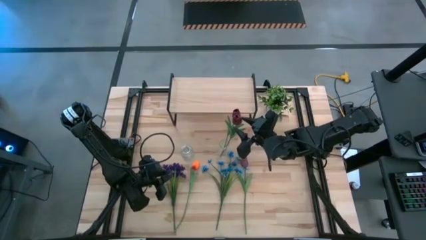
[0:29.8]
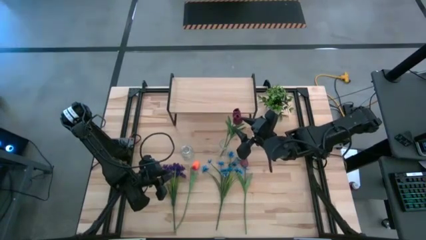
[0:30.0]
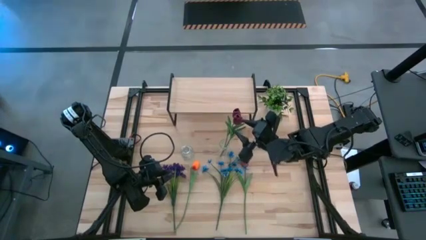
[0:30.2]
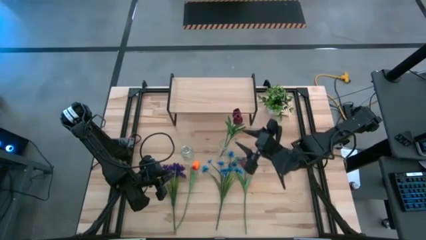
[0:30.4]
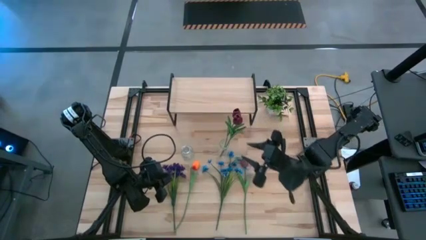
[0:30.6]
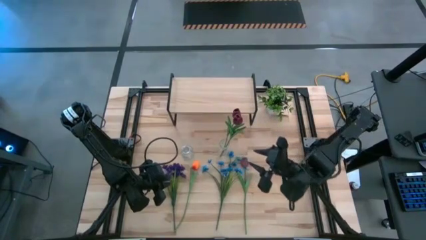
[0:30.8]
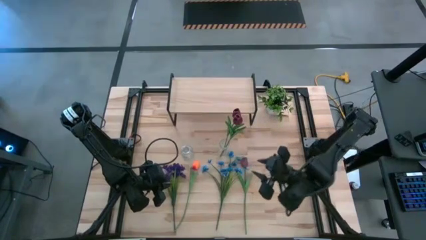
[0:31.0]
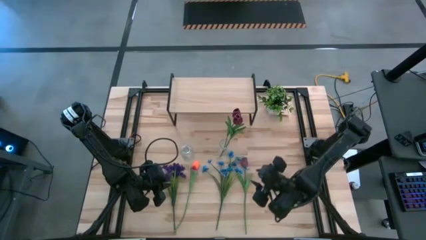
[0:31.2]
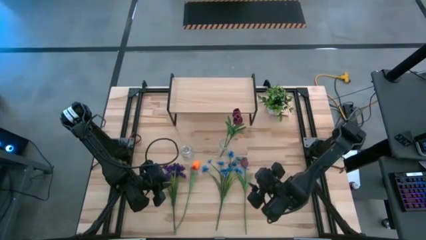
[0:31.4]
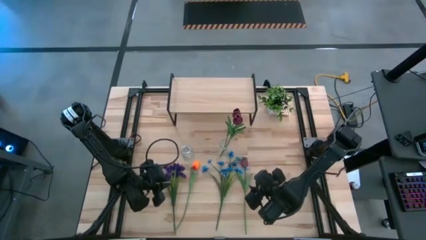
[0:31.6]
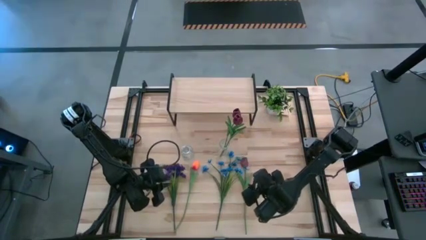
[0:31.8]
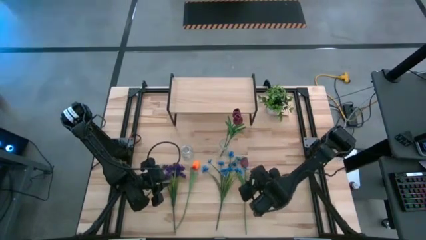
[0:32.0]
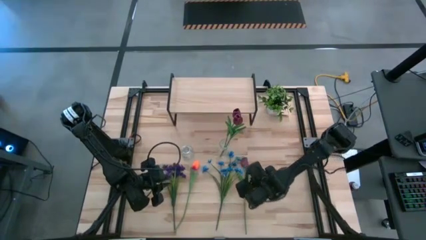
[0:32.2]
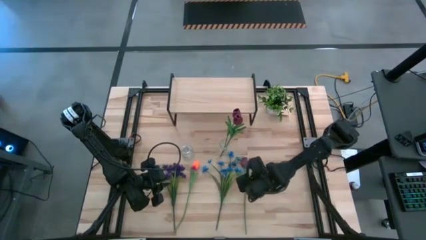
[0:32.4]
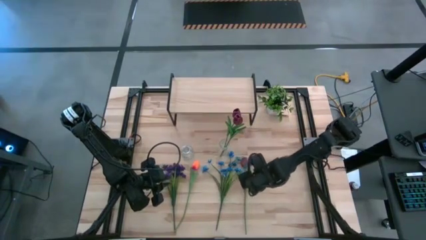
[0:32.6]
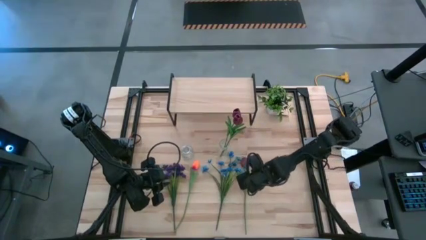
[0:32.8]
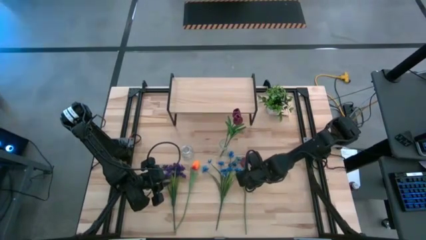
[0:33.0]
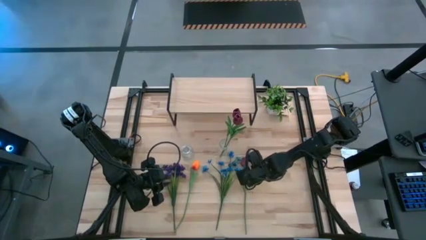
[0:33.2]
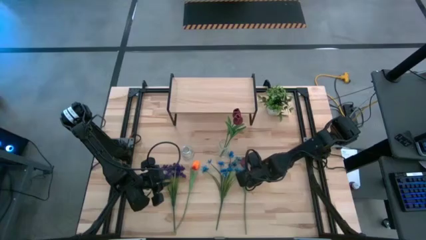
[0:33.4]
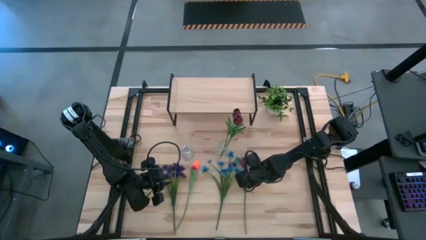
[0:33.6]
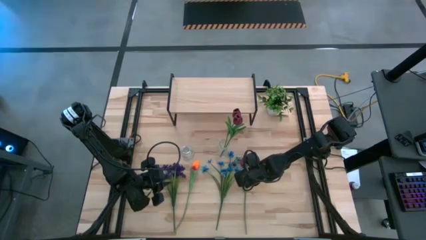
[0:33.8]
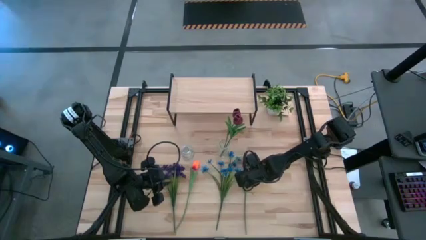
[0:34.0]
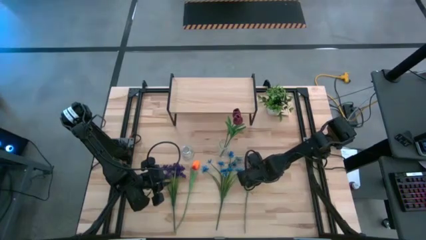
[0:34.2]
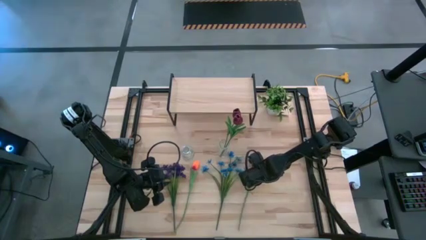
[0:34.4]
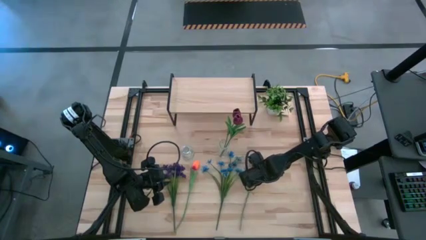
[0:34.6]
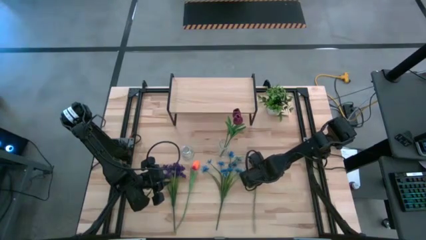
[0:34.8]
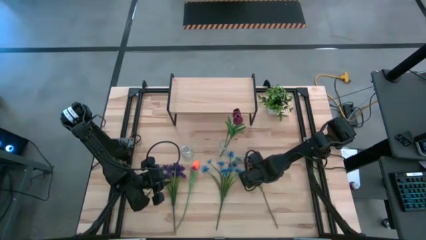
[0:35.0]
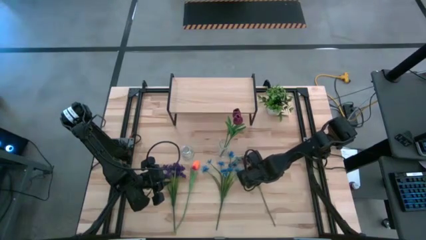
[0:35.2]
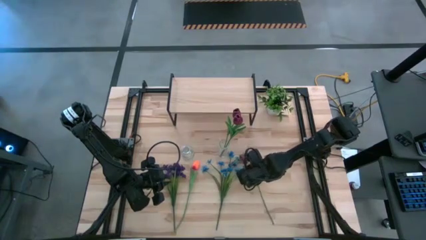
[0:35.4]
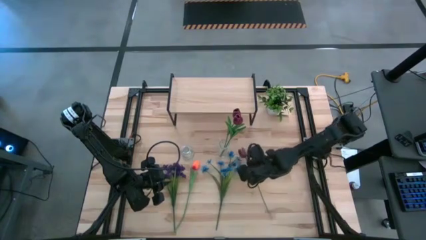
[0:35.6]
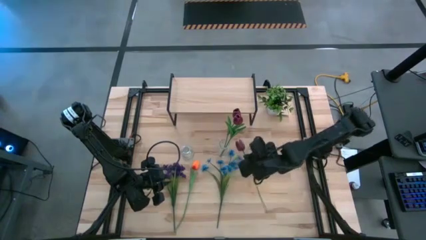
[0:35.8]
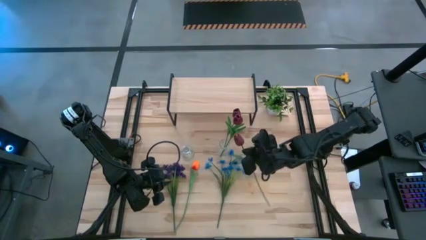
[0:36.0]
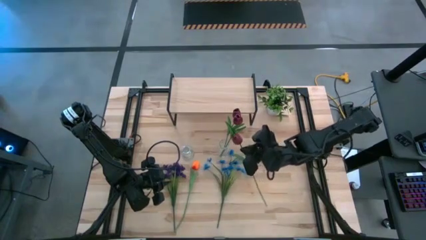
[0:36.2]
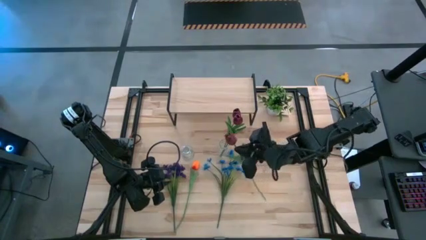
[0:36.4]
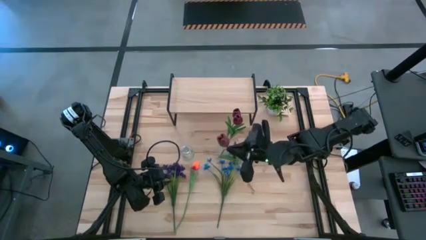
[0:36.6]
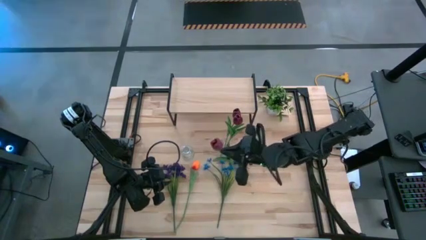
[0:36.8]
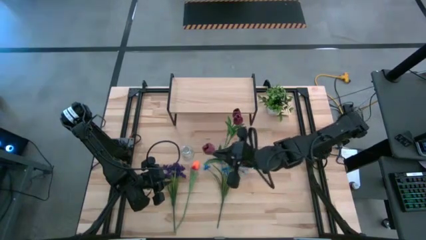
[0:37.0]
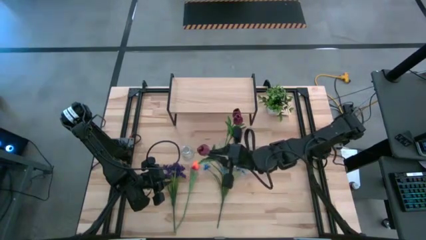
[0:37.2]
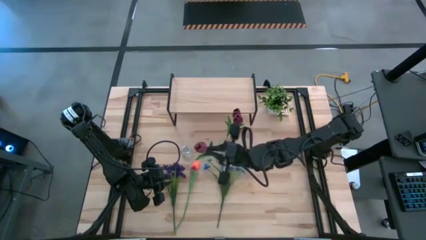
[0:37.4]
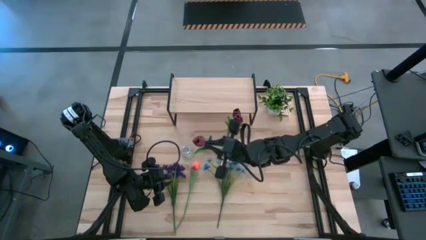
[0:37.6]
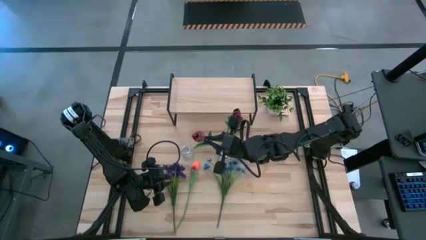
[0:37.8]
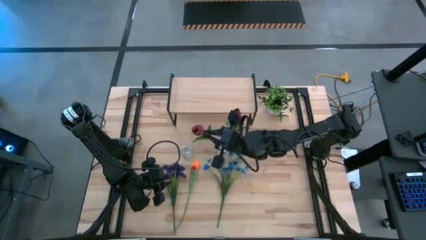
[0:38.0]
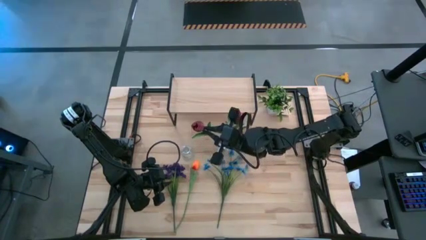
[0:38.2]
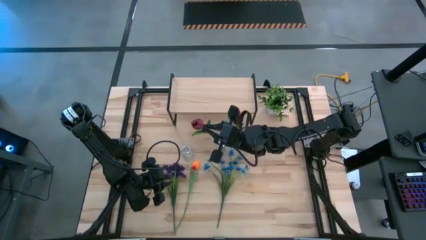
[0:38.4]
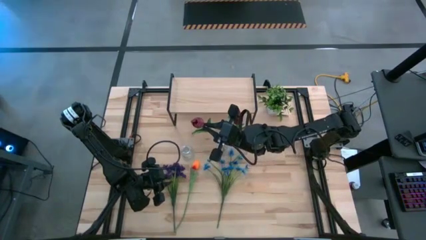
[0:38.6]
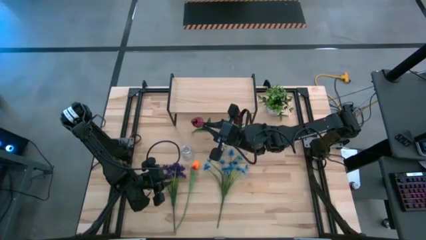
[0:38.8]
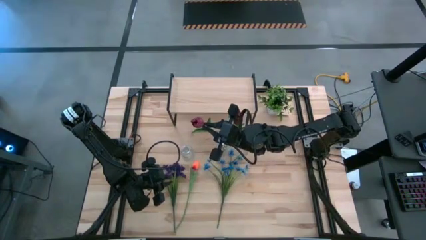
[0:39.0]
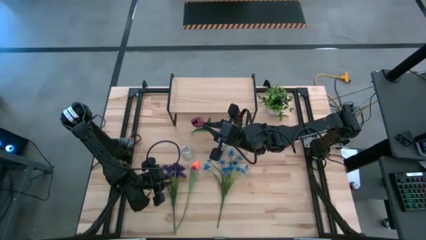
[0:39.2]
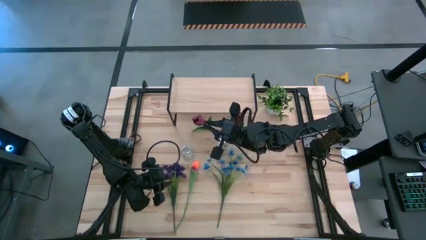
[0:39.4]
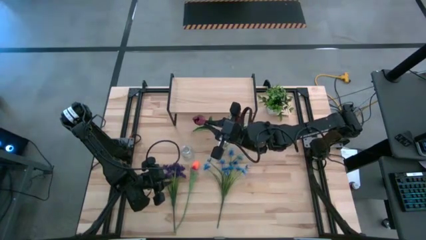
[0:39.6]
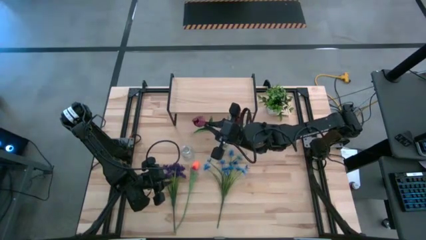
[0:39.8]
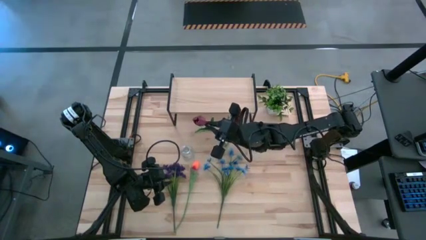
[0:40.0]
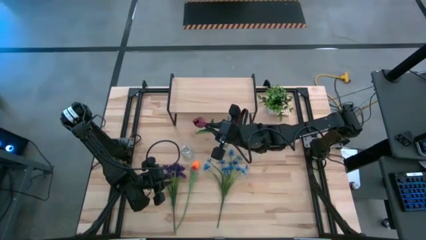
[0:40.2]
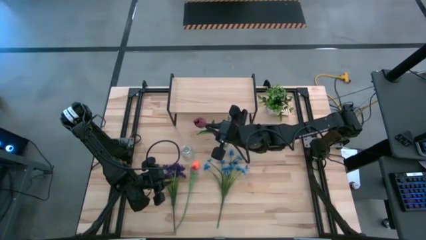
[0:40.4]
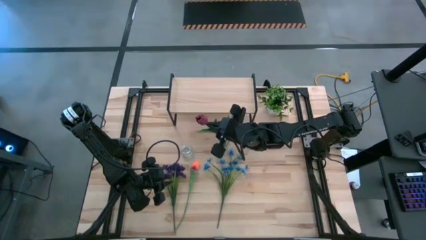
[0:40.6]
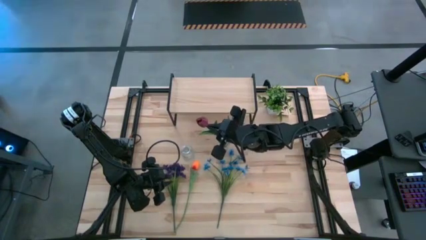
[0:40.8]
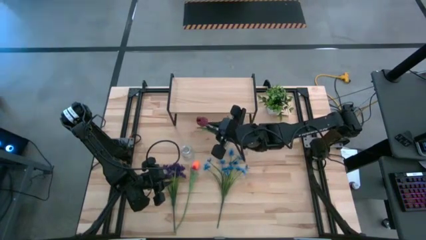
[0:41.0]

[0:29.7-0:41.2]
Task: Pick and place flowers into a vace then onto a shelf
Put the red tulip into the right transparent vase

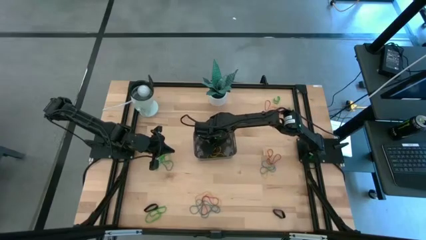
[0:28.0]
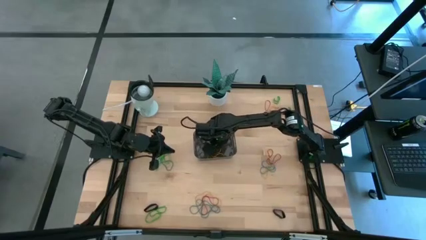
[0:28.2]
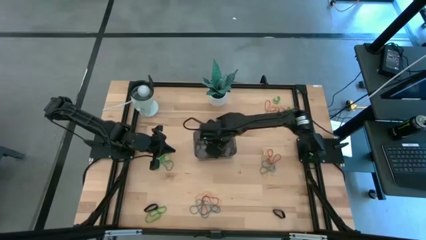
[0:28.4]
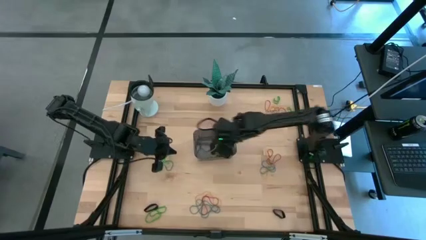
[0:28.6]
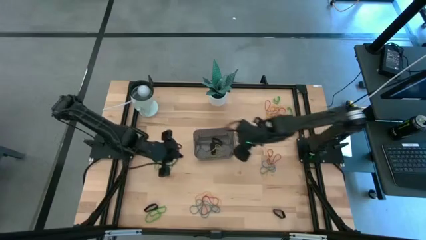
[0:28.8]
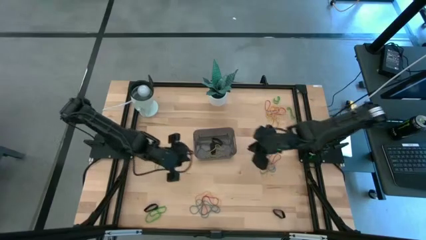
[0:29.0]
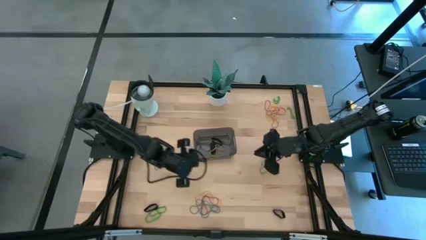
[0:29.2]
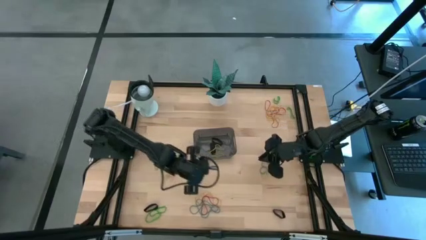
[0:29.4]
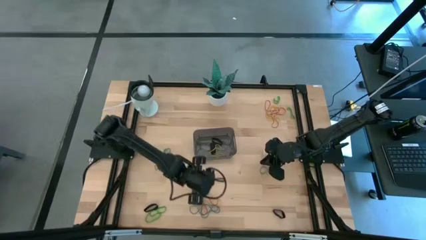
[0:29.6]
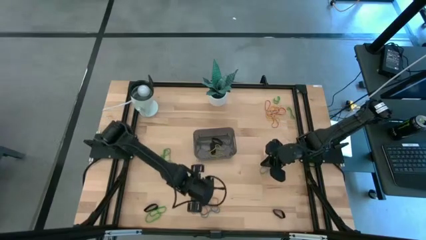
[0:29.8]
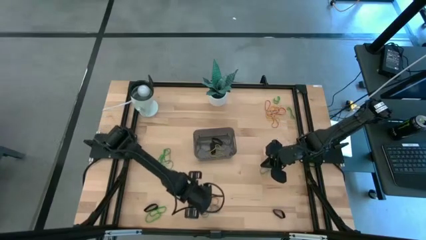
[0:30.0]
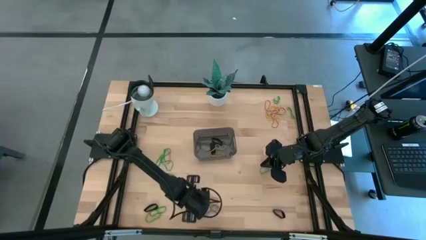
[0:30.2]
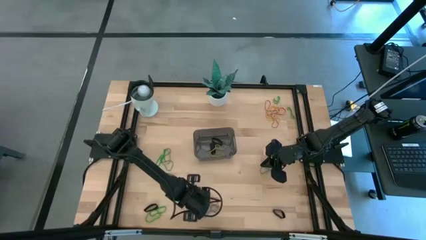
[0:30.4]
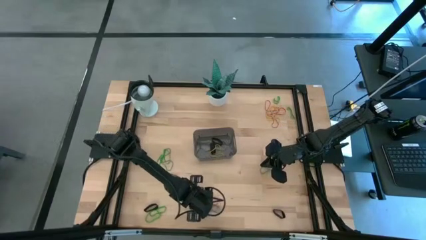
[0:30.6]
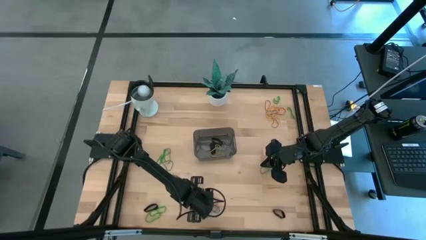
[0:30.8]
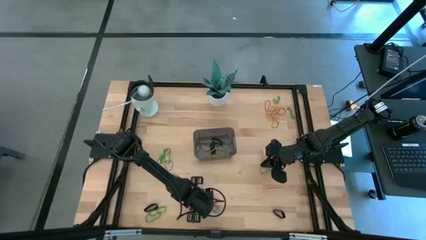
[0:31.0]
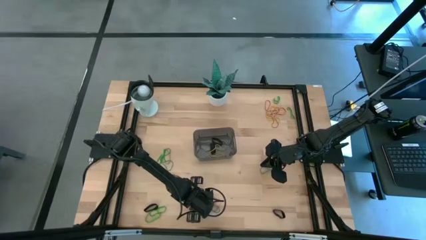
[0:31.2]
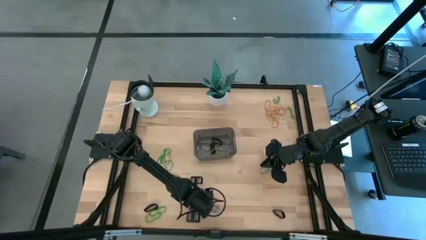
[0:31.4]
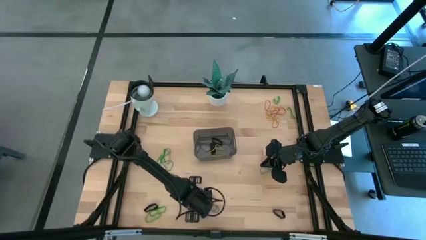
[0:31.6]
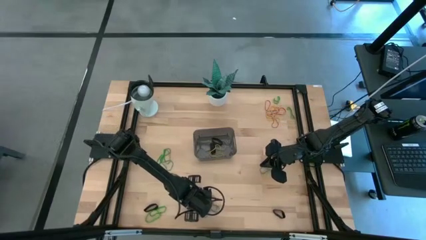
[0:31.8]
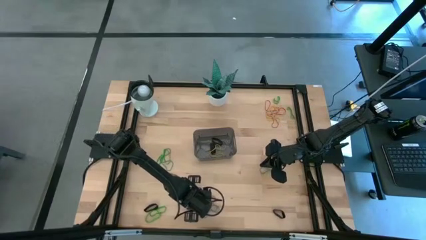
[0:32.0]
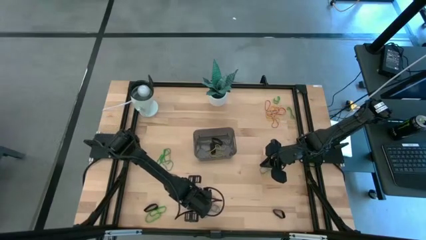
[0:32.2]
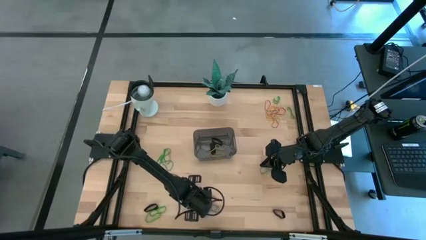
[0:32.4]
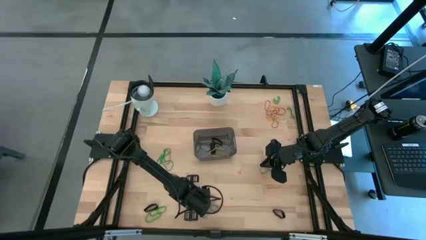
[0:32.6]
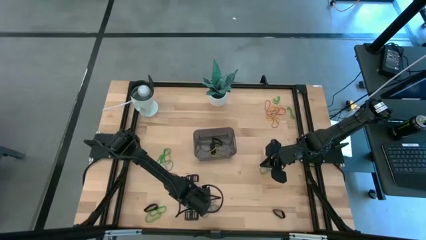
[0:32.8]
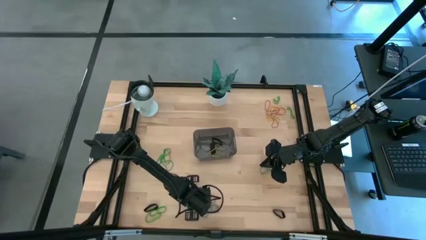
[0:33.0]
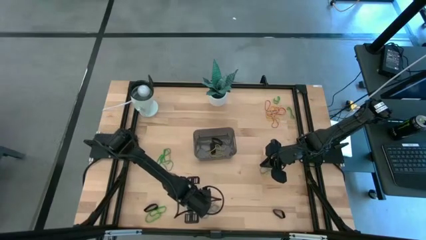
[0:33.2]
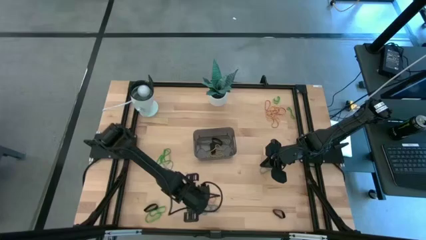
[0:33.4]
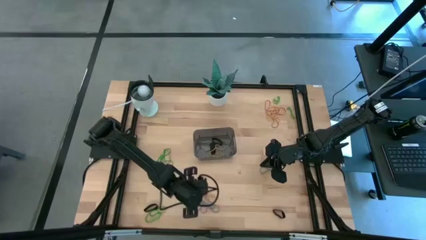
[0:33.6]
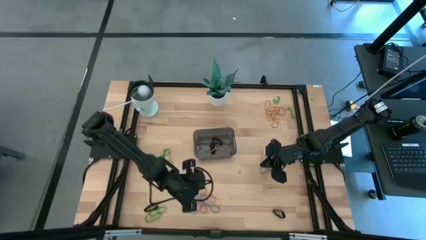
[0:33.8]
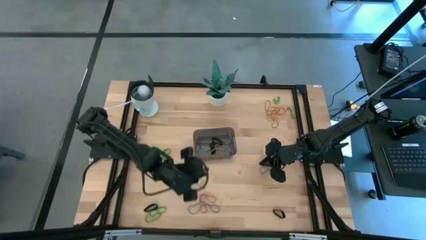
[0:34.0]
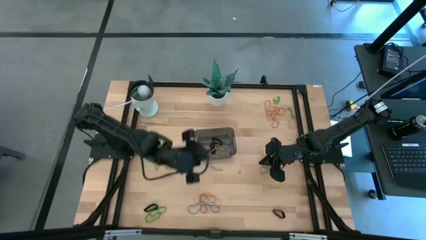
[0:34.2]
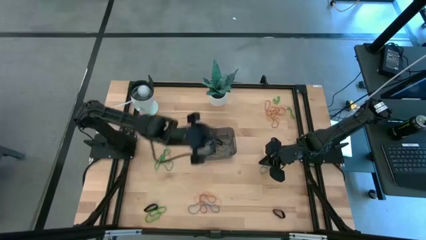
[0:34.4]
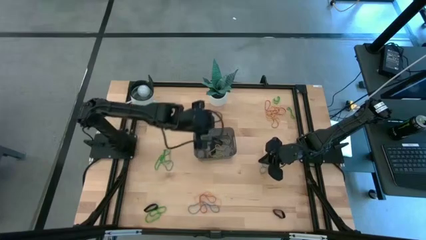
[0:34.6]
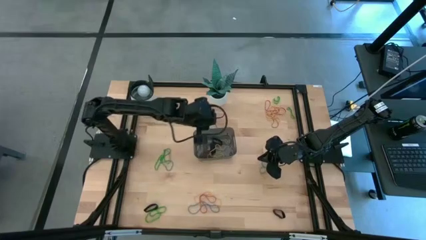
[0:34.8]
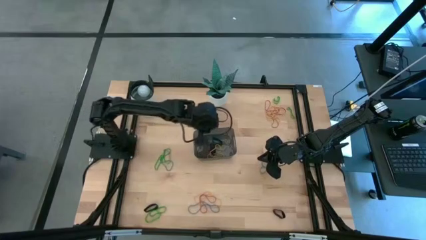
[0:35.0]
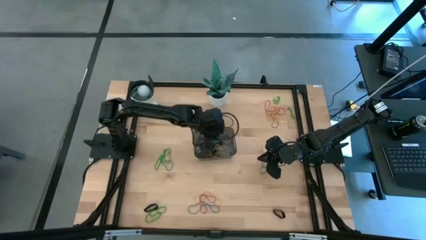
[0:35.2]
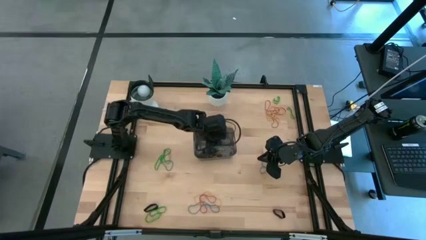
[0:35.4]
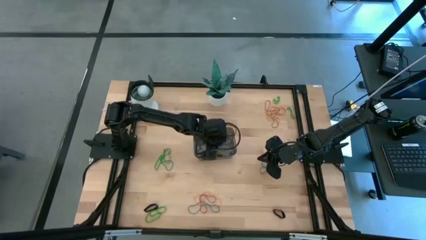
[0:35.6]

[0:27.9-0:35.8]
Task: Pick and place rubber bands into bin
Put the blue rubber band into the black bin
